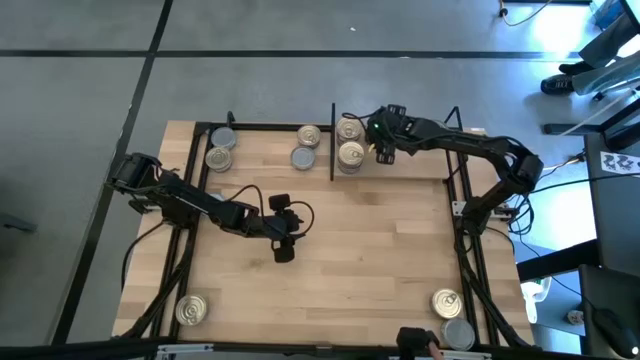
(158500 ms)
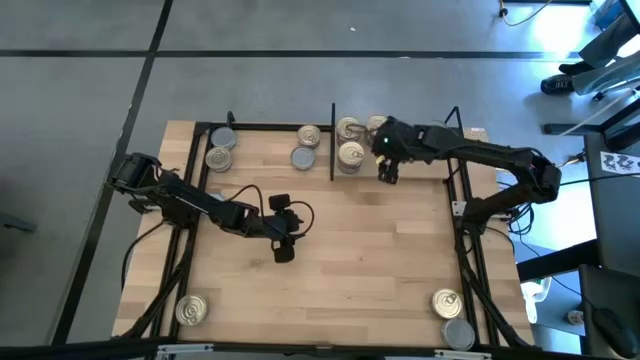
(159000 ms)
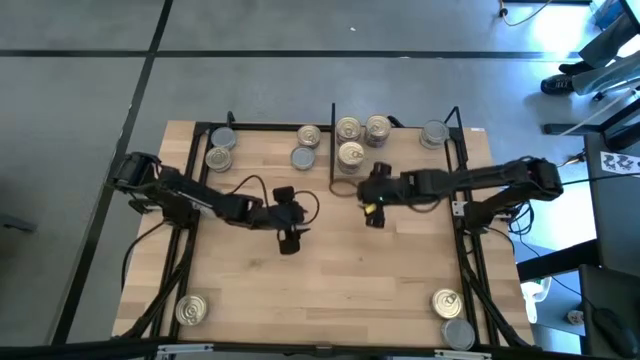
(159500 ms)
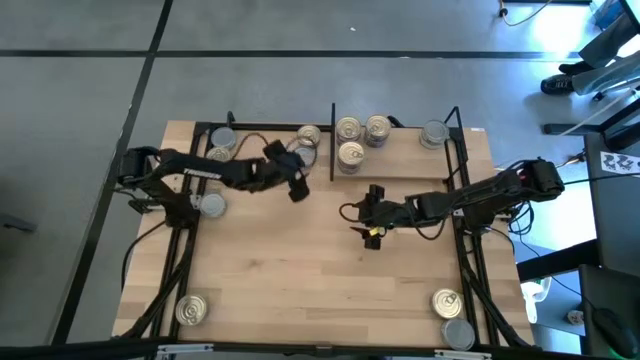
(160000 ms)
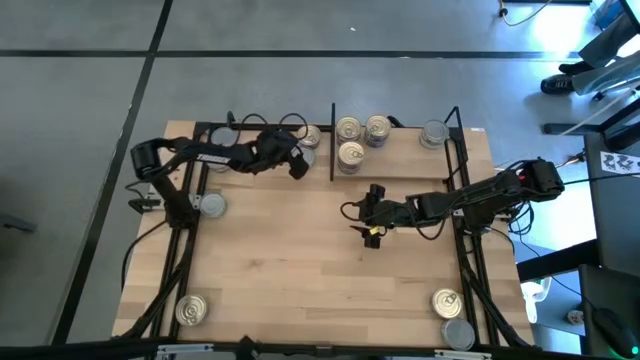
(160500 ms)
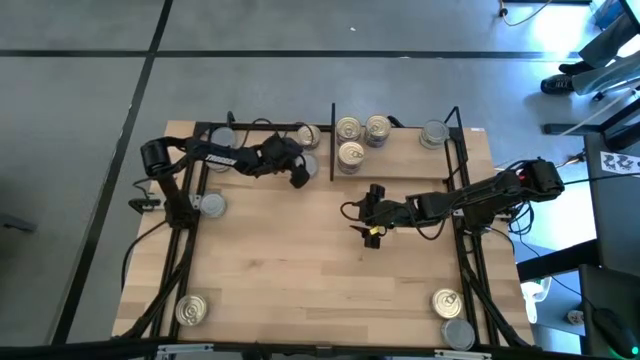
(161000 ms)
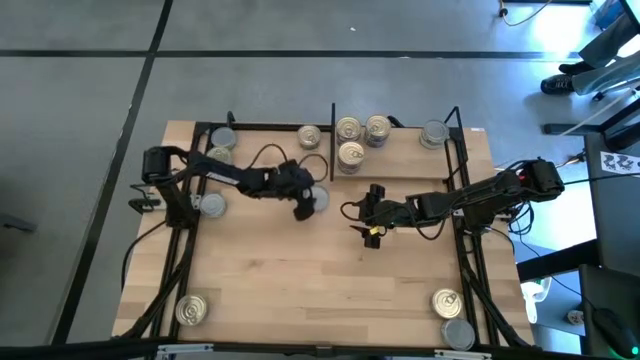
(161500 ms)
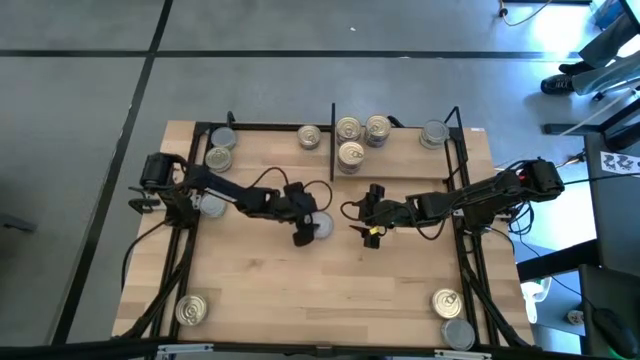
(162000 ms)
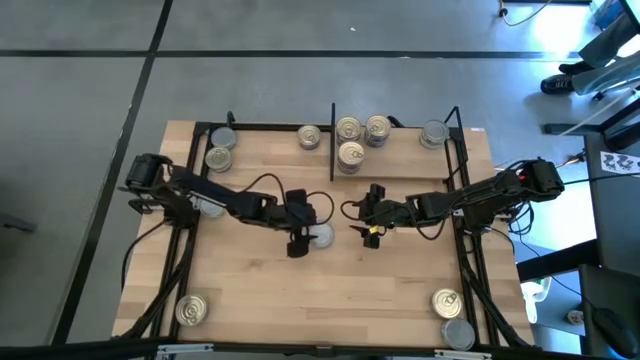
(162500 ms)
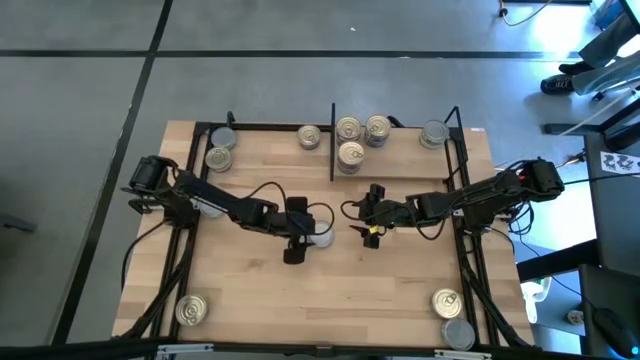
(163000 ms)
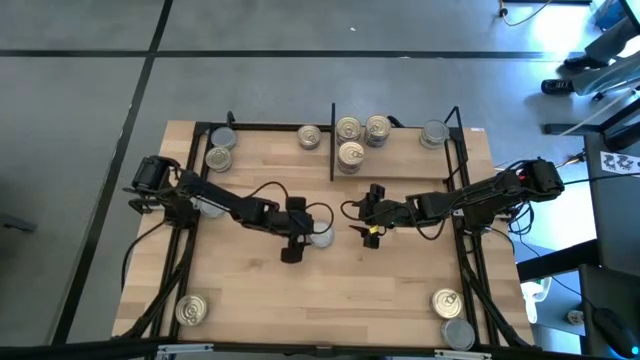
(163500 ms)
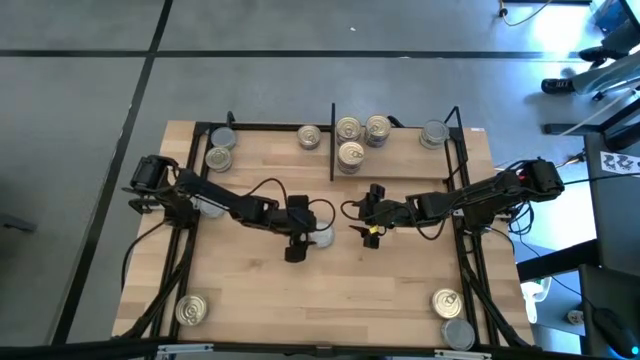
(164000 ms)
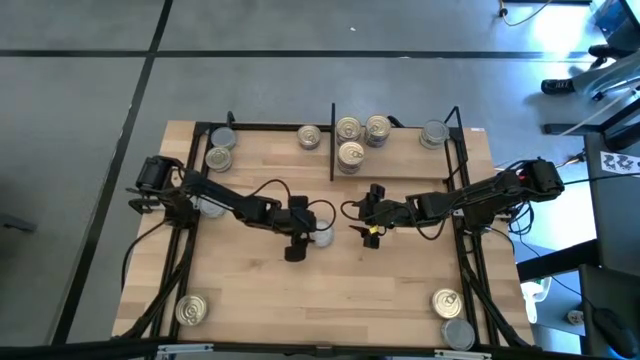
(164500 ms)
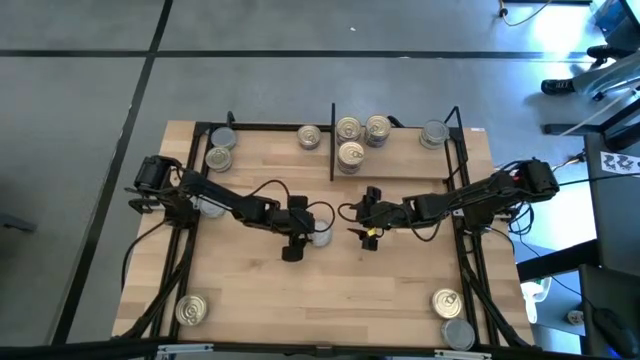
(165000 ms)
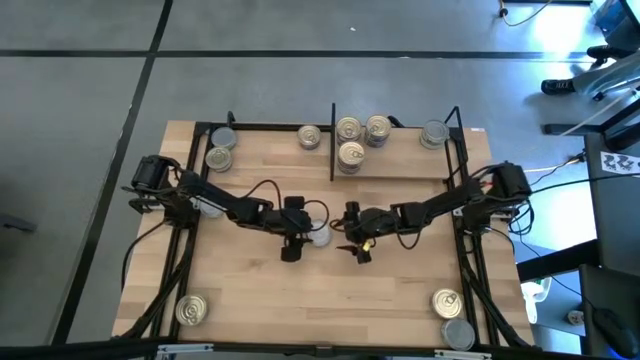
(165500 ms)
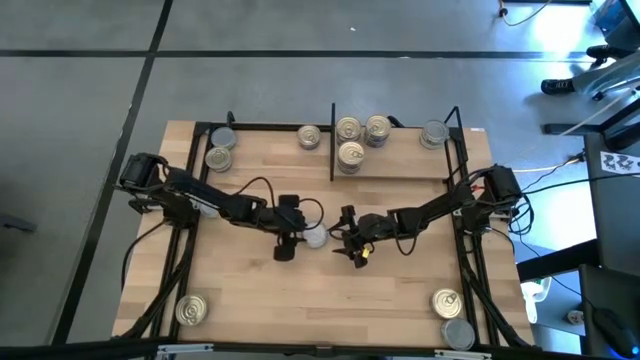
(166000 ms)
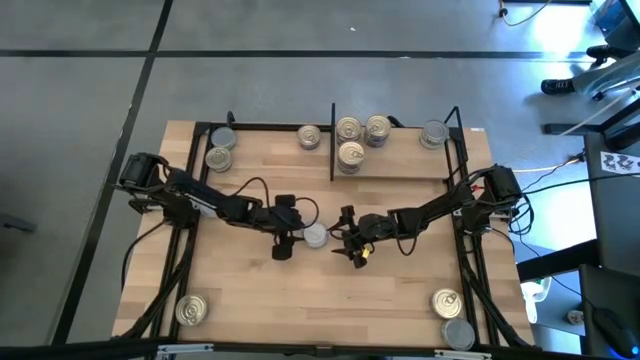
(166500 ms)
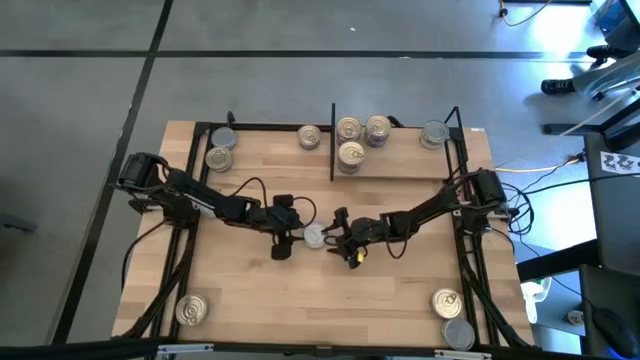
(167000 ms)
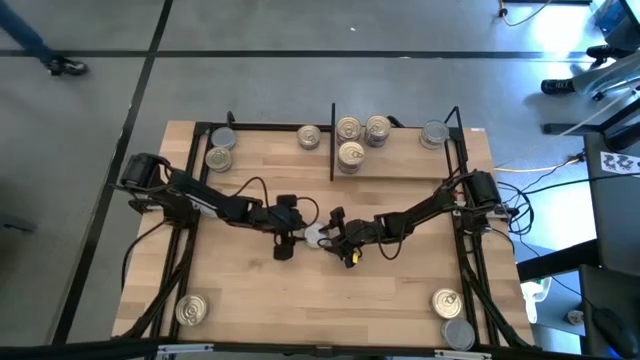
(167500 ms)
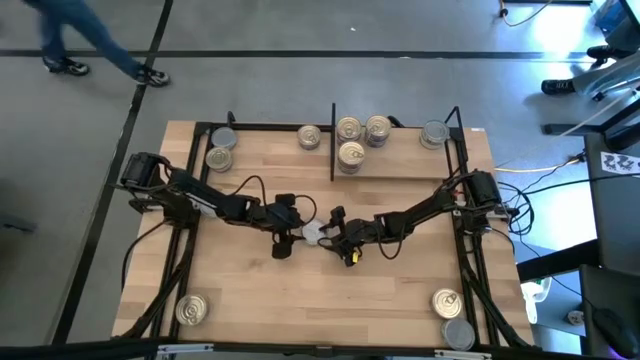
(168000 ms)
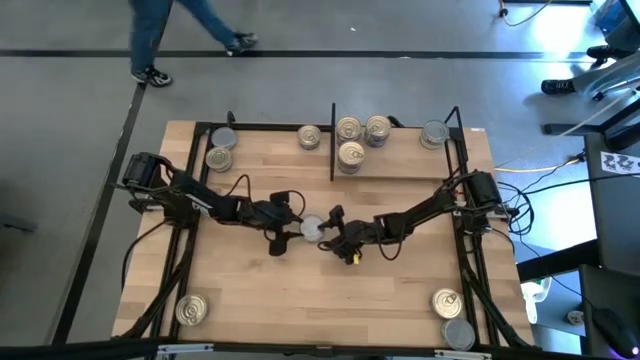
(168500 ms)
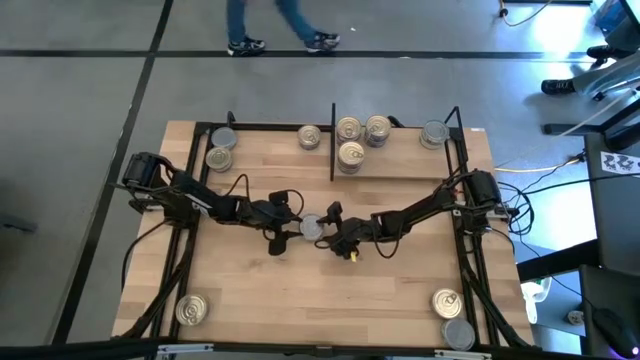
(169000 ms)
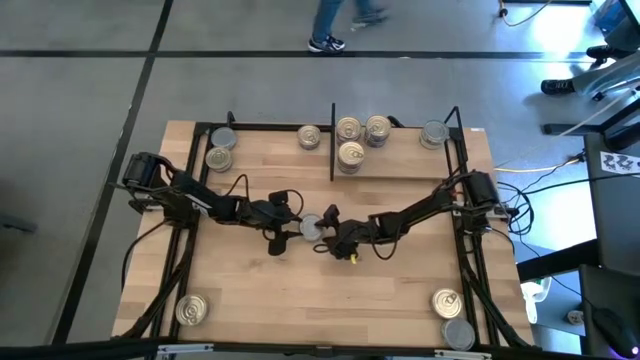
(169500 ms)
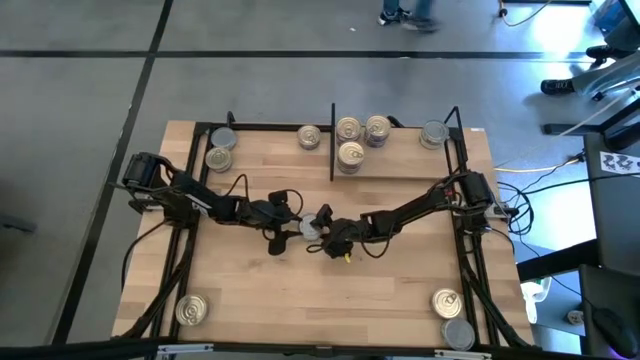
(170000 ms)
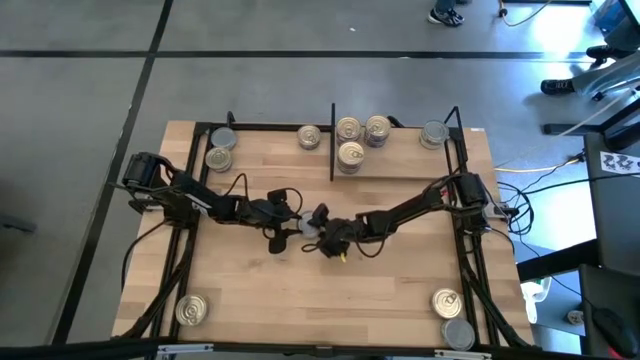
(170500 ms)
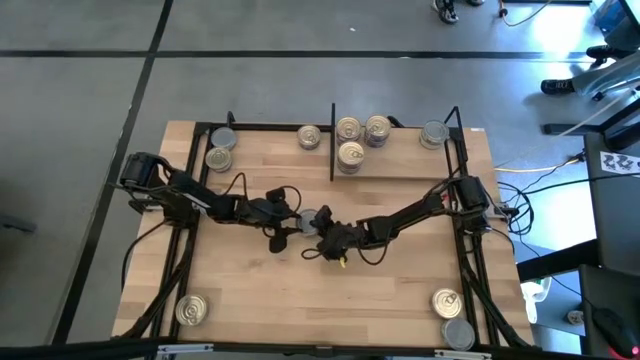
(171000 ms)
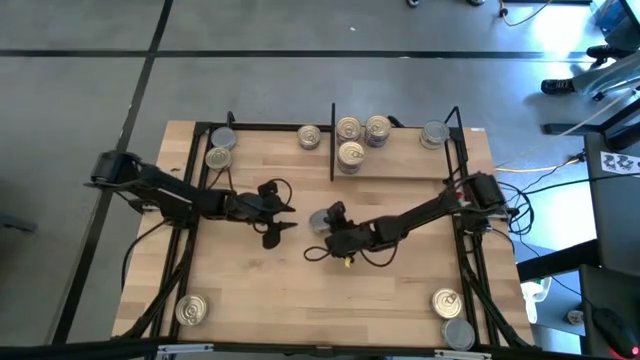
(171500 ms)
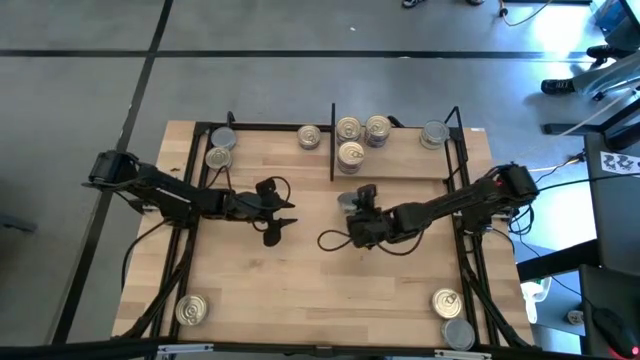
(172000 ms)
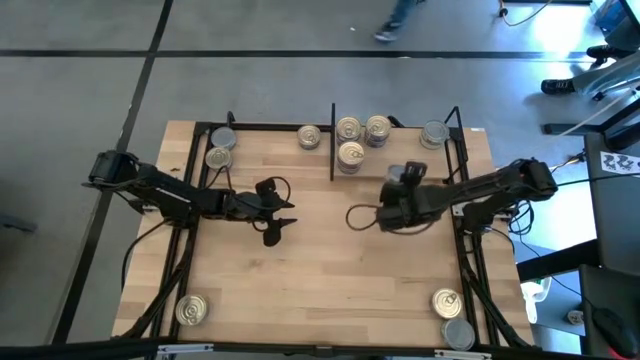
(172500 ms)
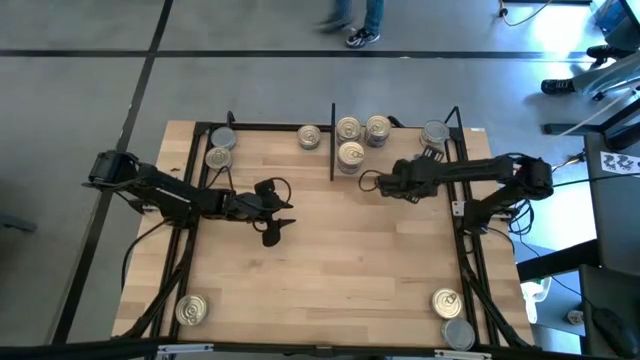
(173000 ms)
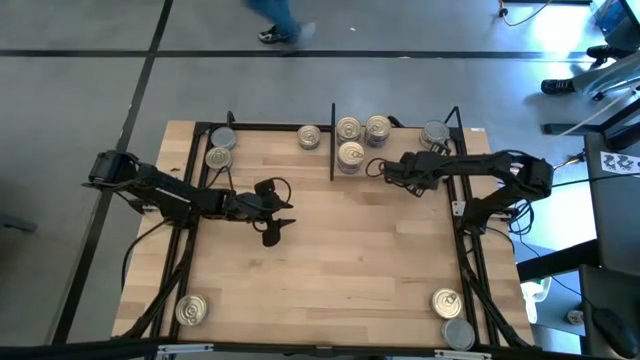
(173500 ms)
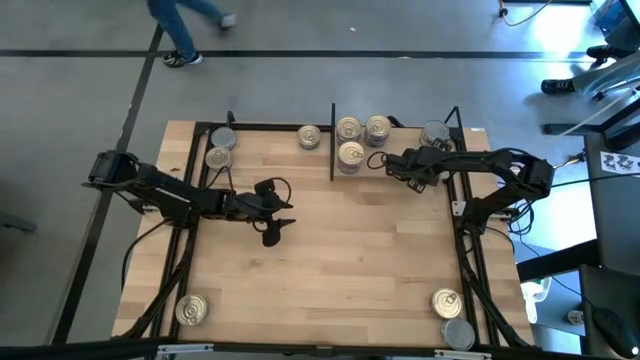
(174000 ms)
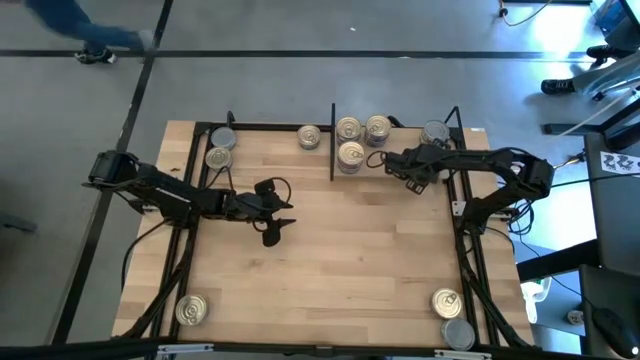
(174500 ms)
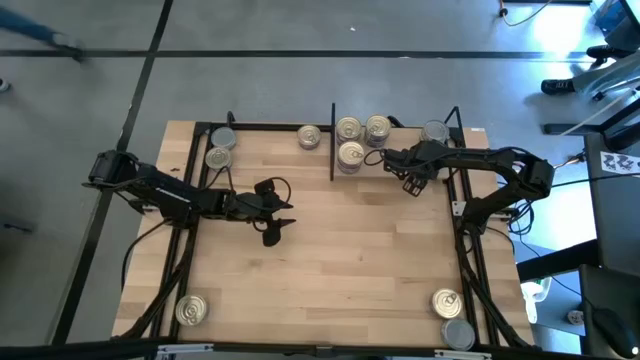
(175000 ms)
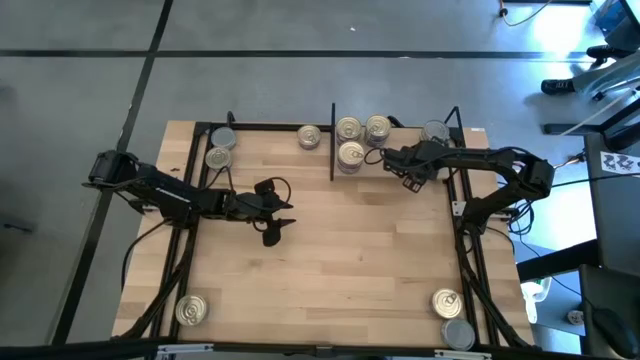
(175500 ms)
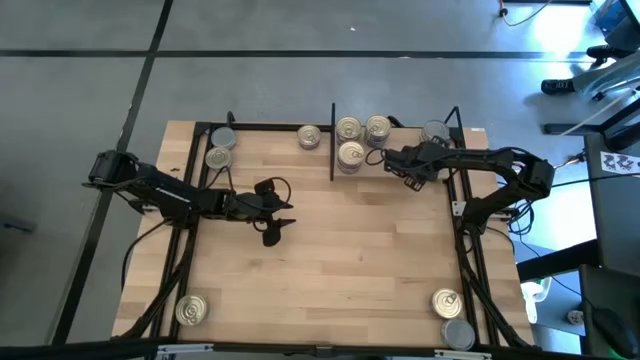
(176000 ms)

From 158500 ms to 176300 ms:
Task: Stack canned seafood by type on shelf
Put the top green tuna can on the shelf

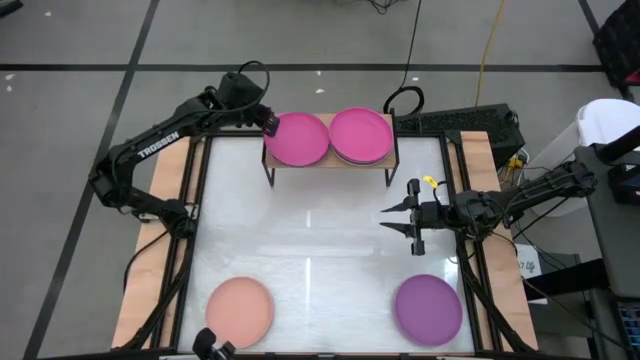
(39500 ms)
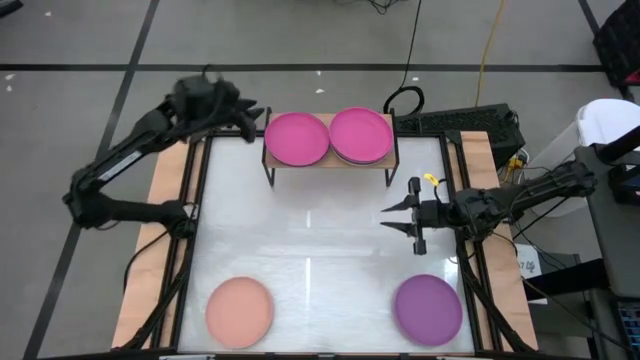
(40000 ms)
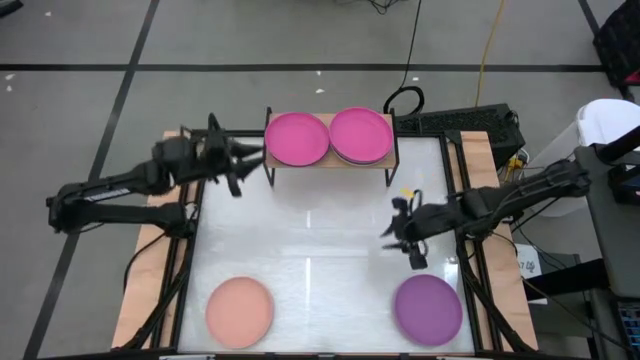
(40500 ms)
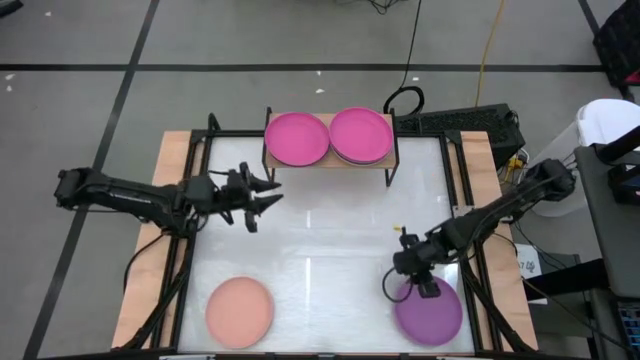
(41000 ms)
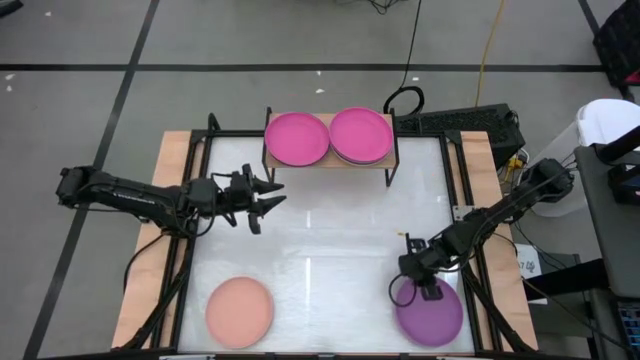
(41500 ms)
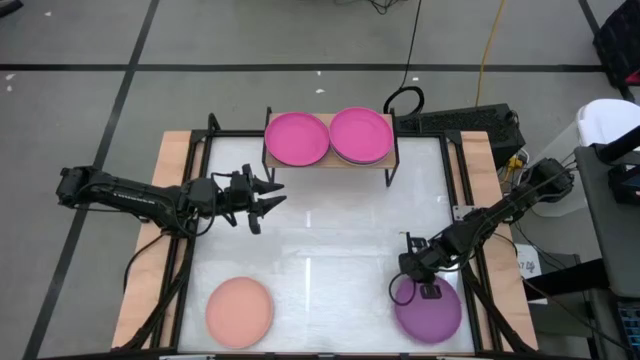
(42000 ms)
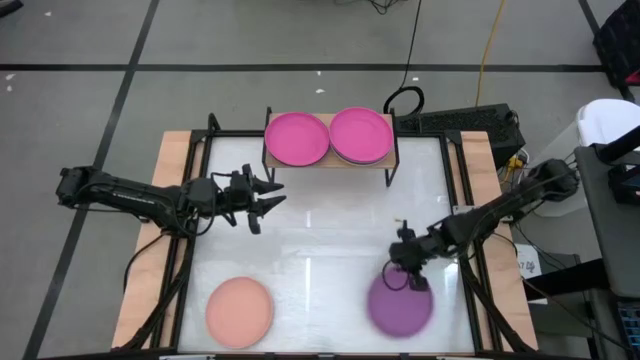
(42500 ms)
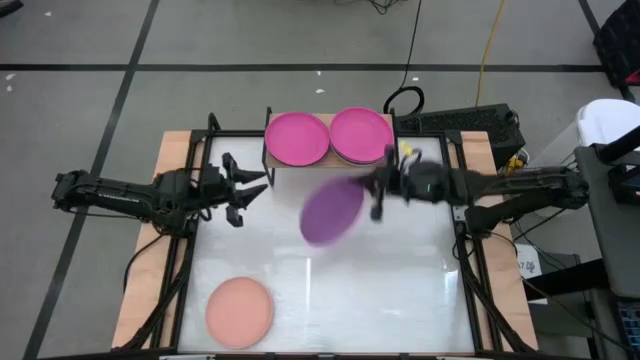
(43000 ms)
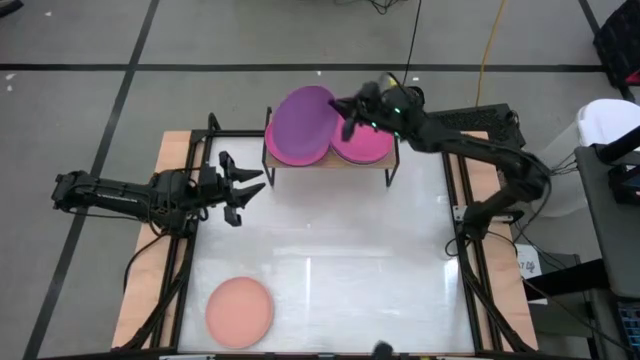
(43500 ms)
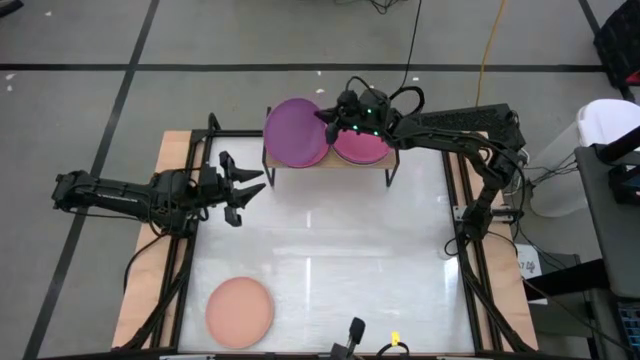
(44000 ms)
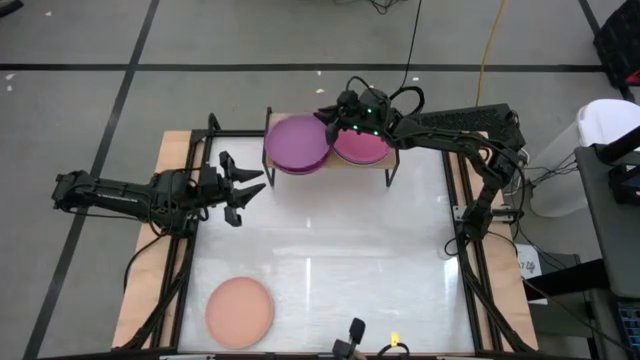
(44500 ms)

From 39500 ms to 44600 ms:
Task: Place and stack plates onto a shelf
Stack the purple plate on the pink plate on the shelf
